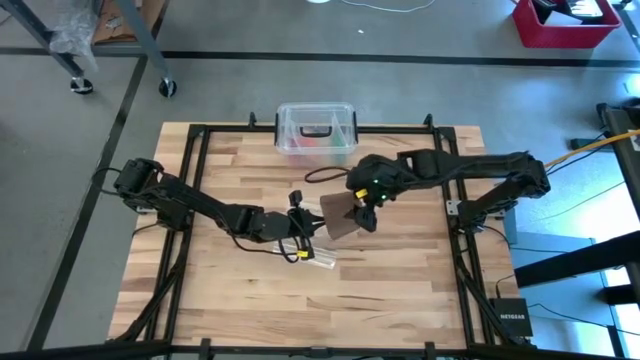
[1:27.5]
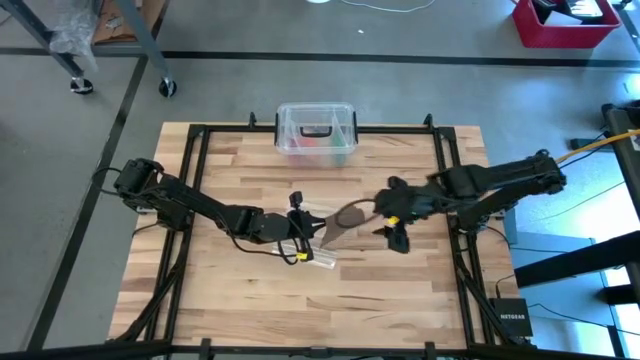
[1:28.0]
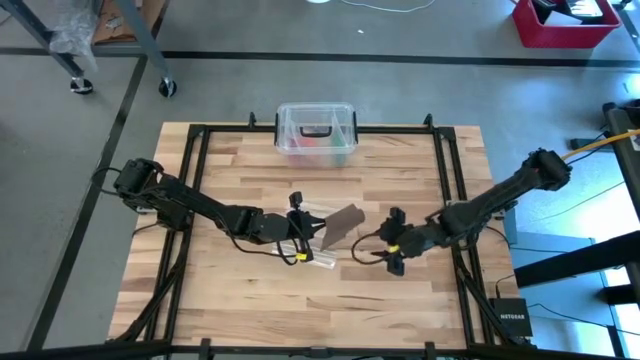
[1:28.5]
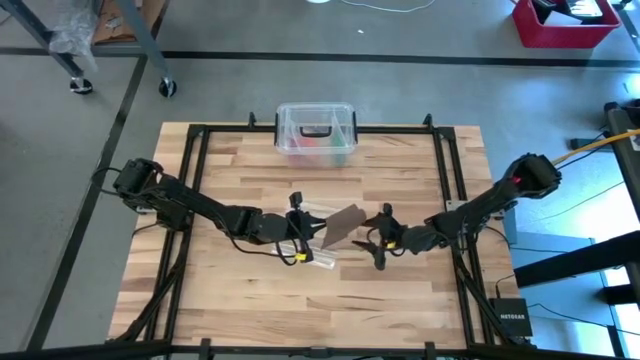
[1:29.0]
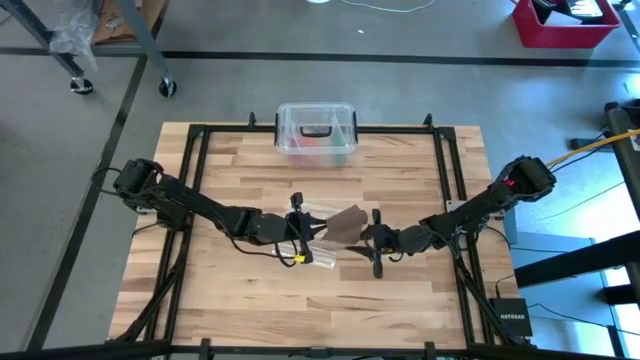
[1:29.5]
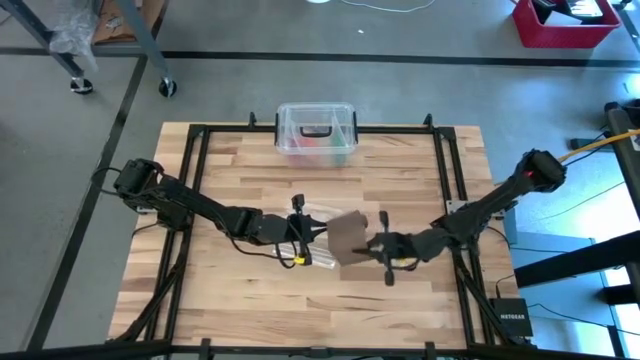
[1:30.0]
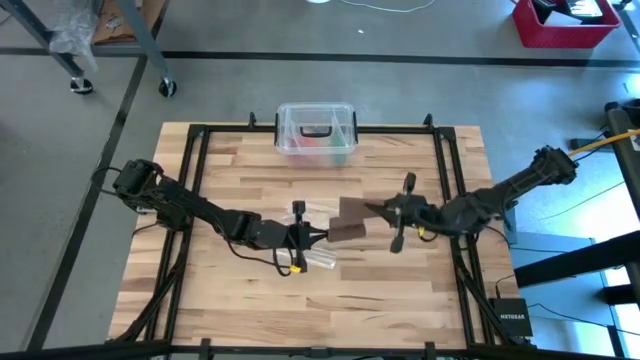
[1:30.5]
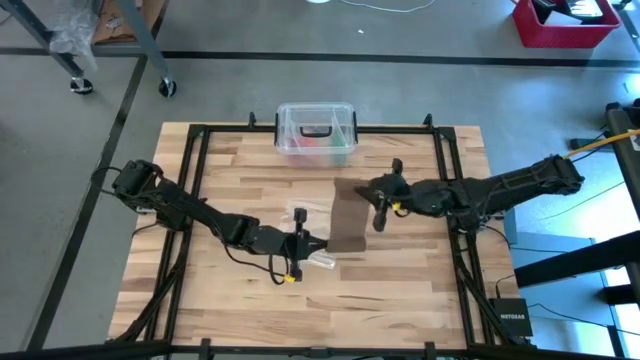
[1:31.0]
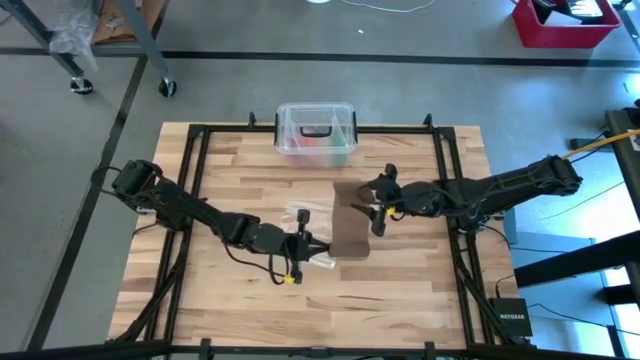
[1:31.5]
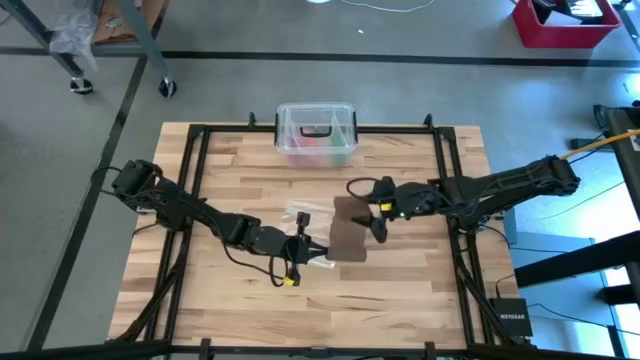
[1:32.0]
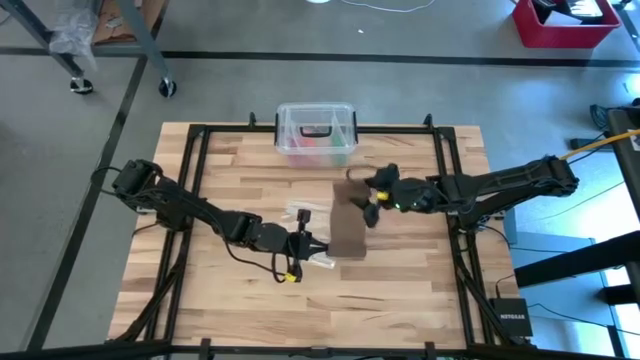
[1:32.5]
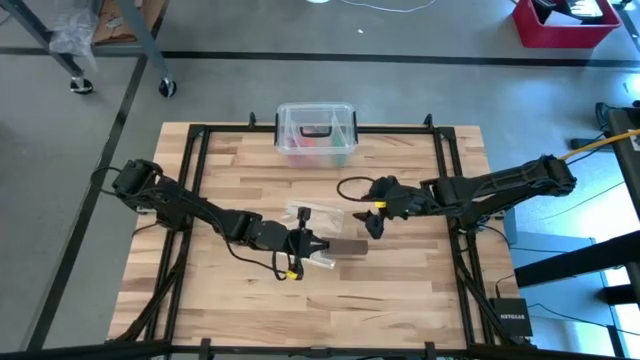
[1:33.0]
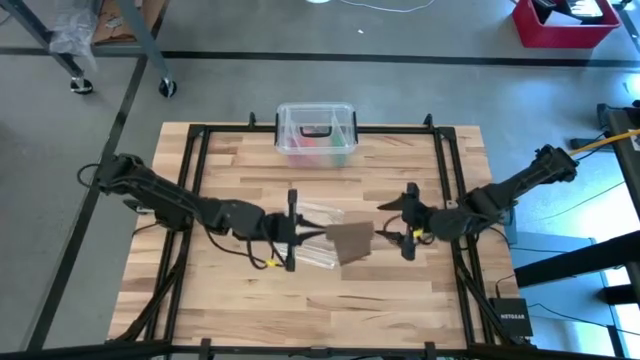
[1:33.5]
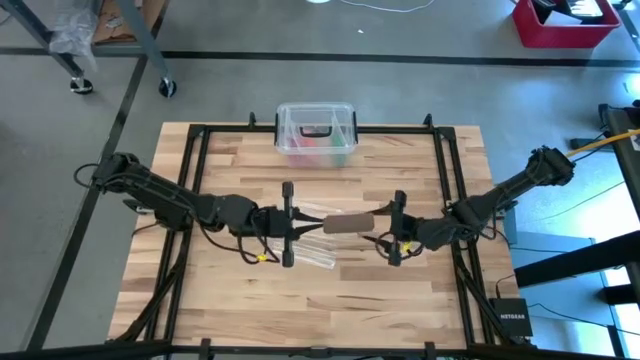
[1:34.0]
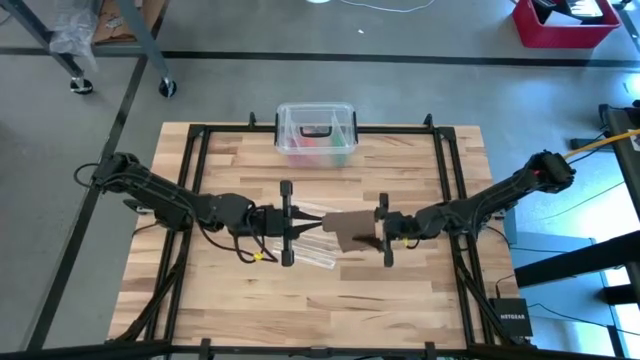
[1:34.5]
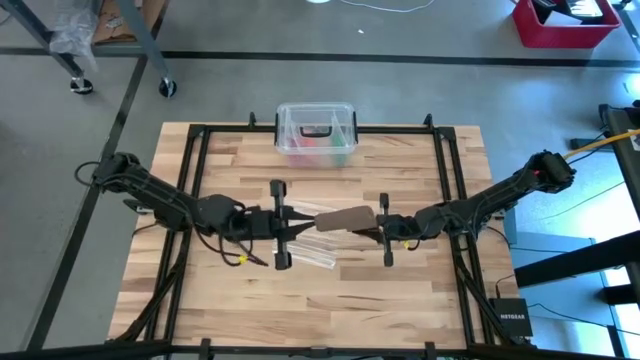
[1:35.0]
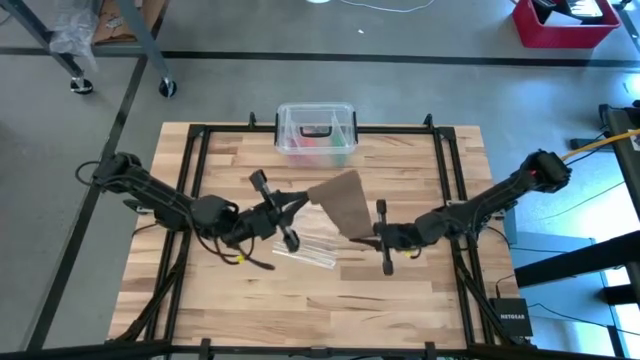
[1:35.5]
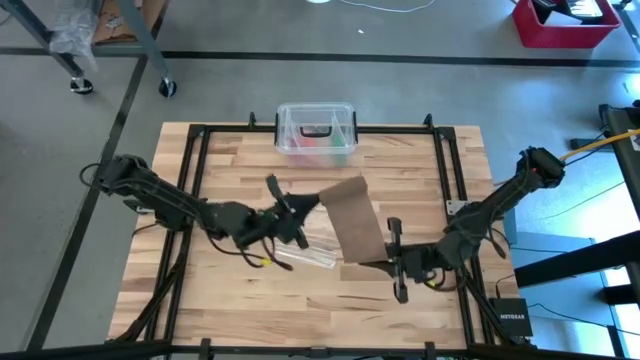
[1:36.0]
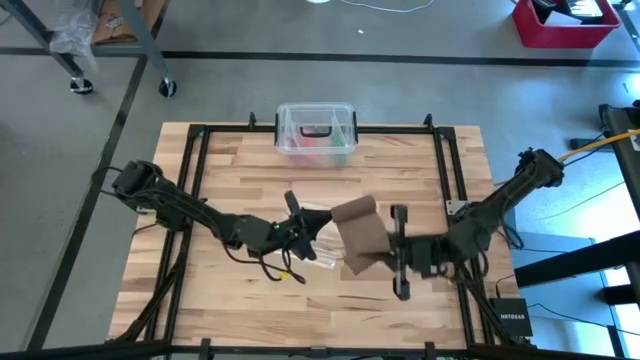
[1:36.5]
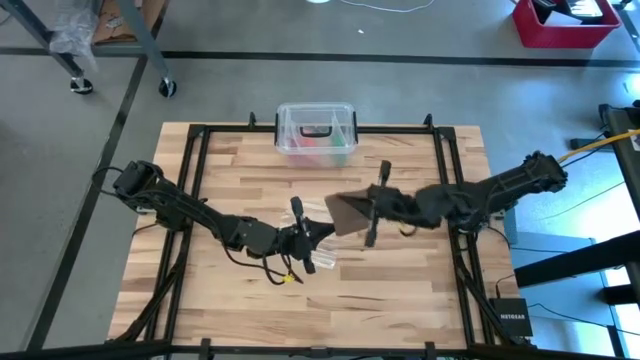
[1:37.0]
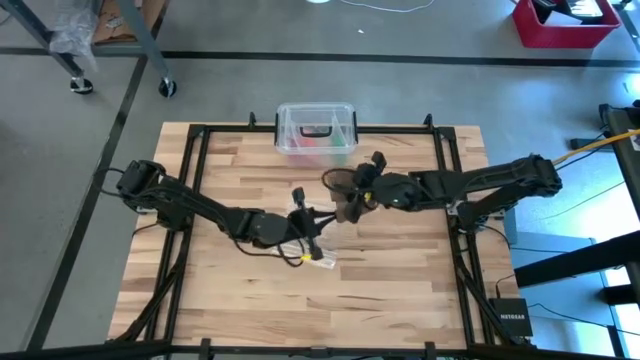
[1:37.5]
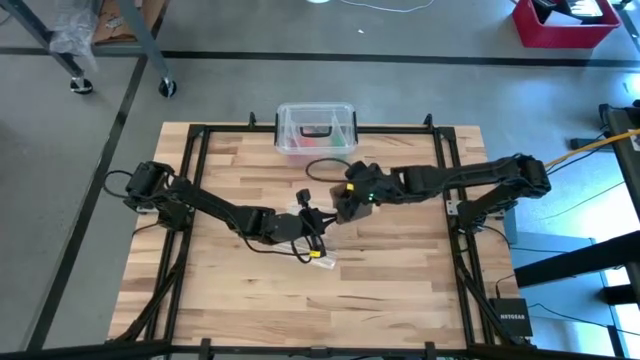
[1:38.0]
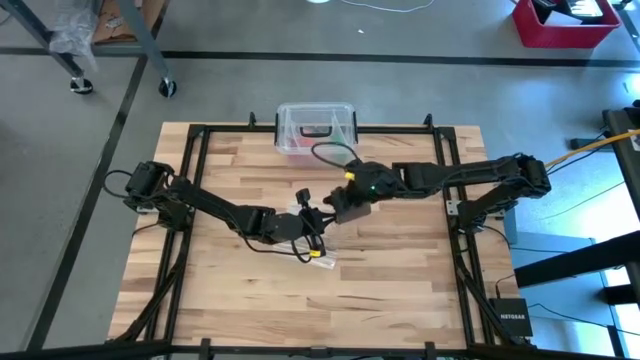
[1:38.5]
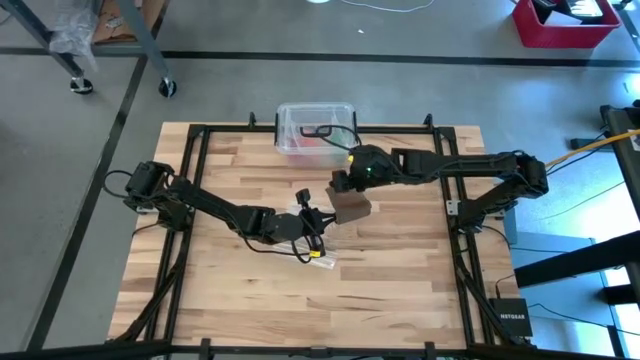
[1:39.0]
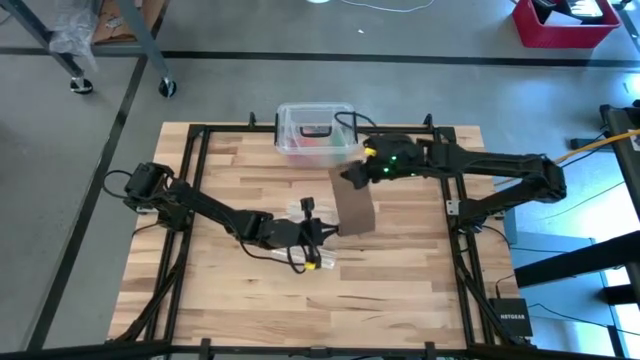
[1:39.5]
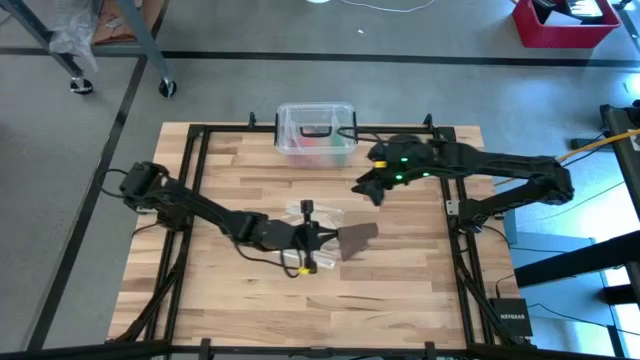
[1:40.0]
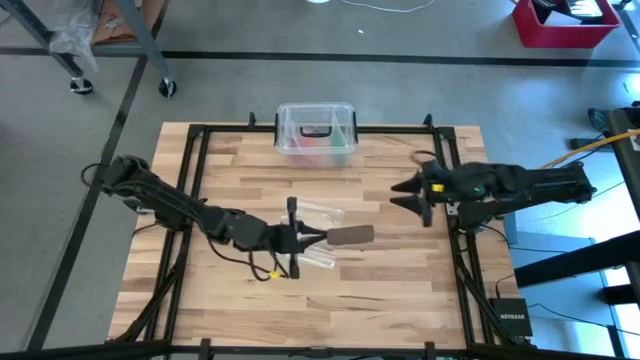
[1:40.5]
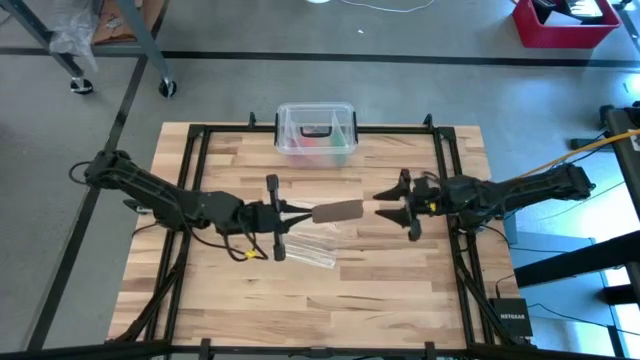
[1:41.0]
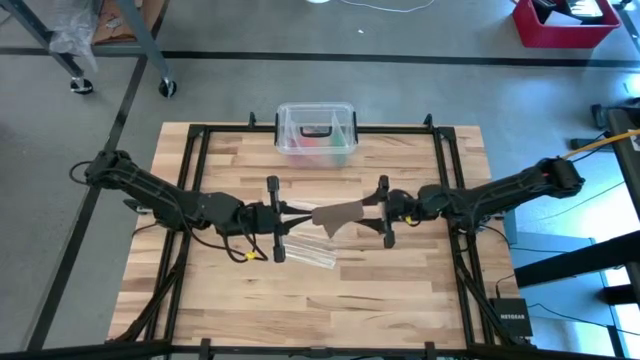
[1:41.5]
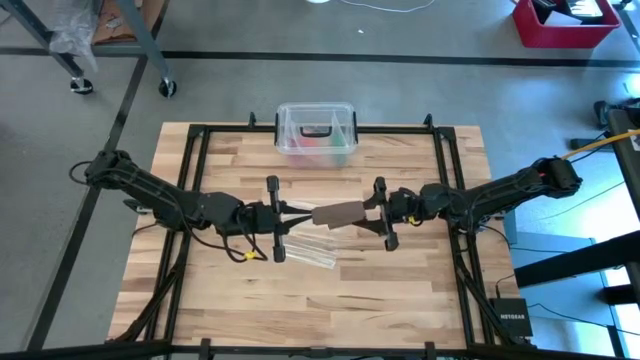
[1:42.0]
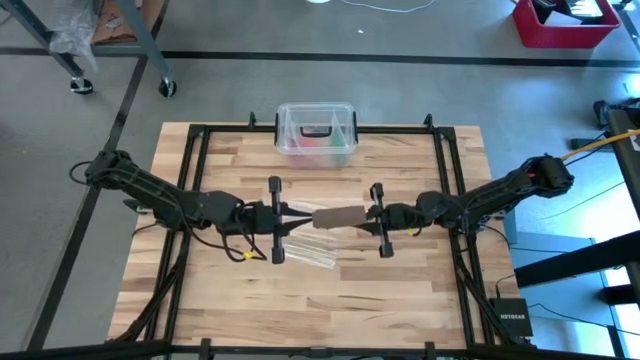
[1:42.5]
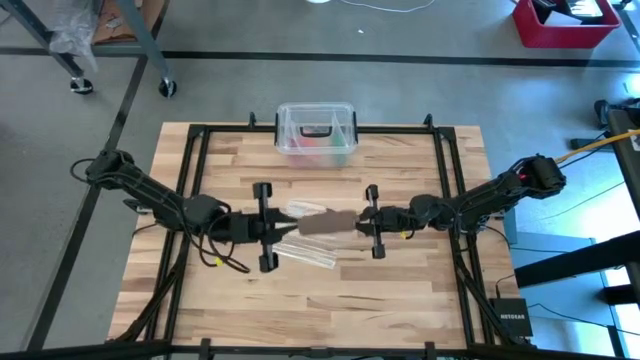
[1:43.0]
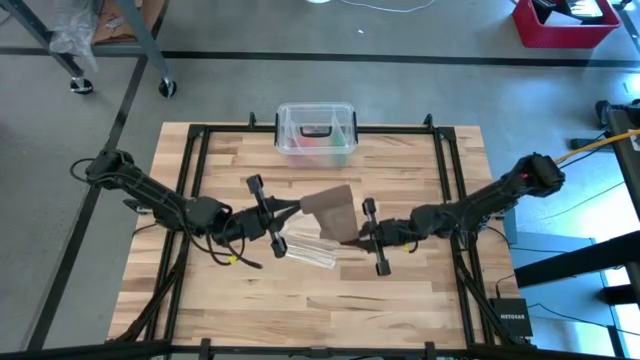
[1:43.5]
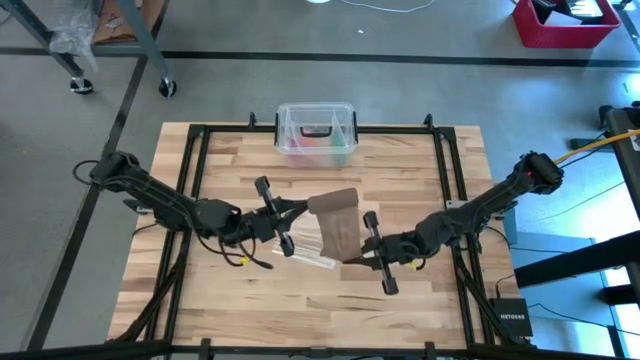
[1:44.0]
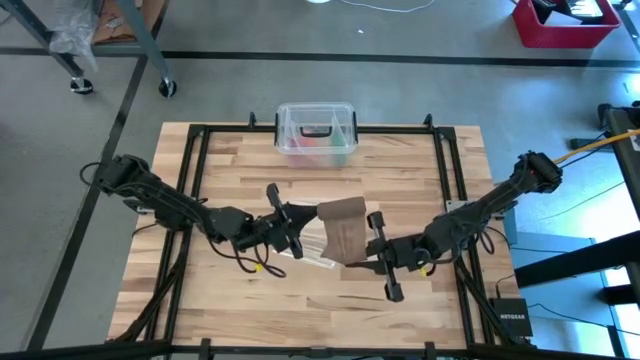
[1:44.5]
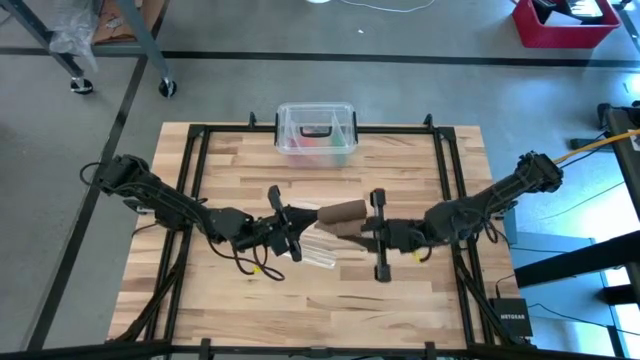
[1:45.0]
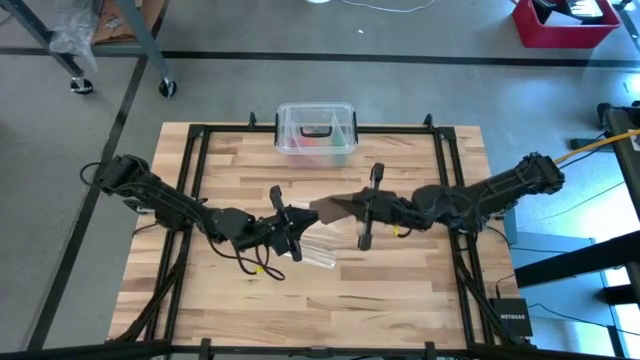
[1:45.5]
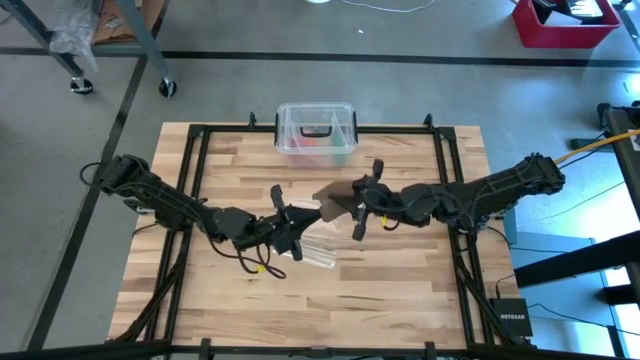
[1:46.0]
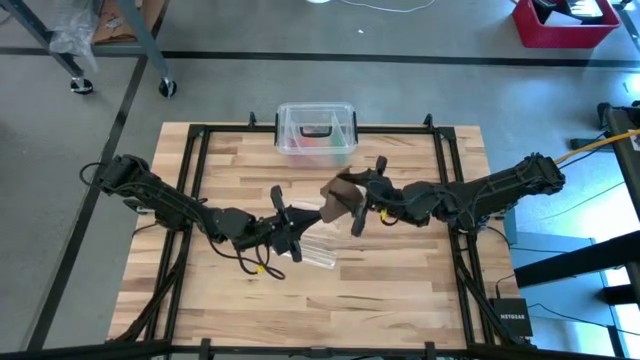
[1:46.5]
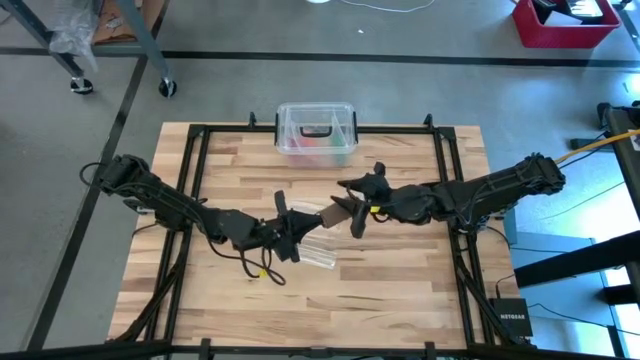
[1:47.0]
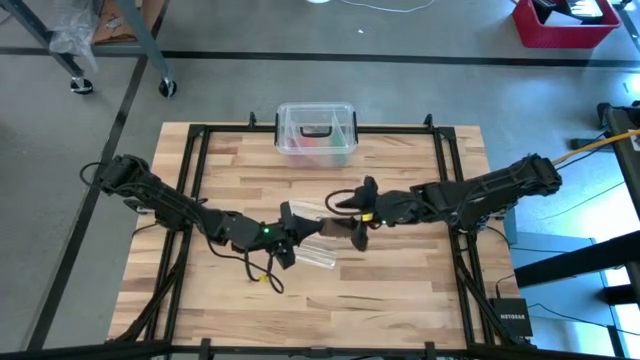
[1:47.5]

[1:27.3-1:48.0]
Task: Roll bandage
Roll the brown bandage
